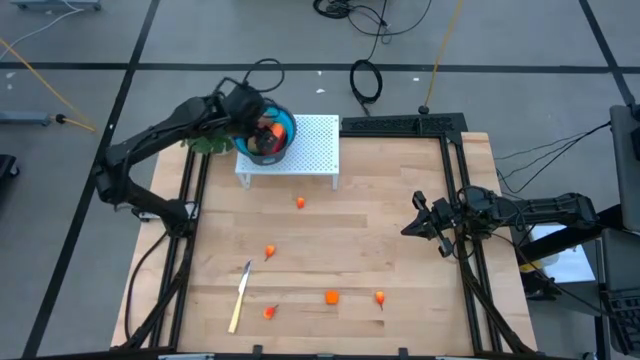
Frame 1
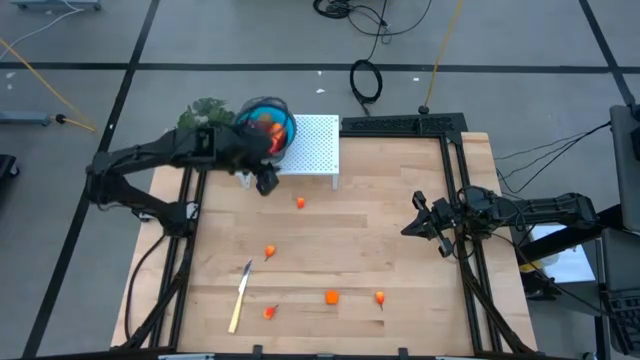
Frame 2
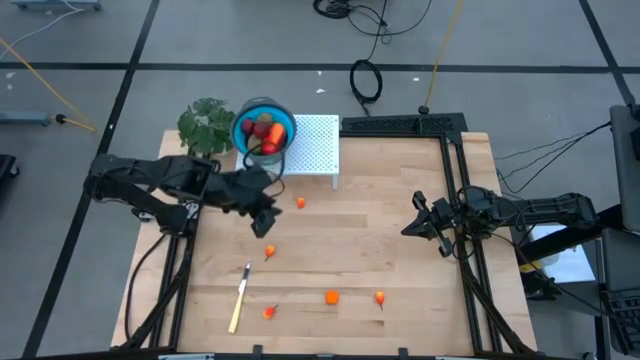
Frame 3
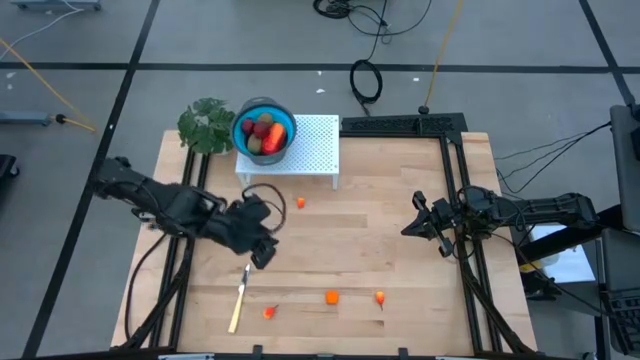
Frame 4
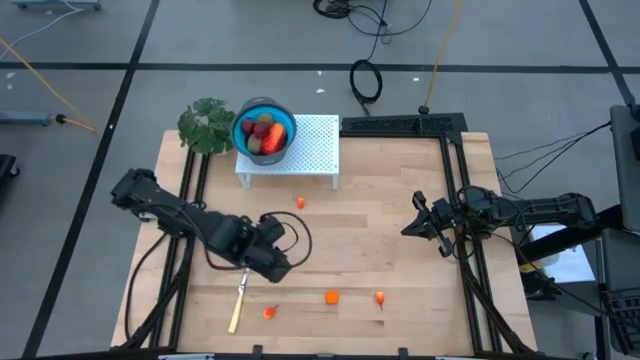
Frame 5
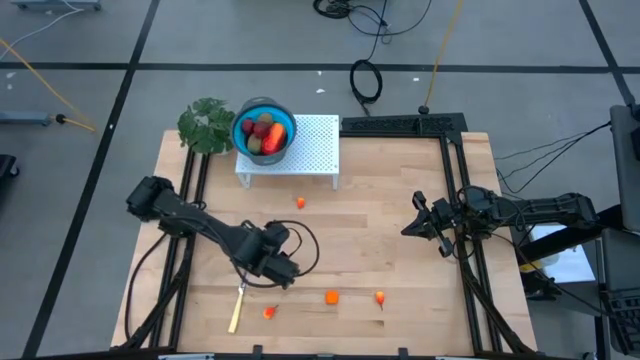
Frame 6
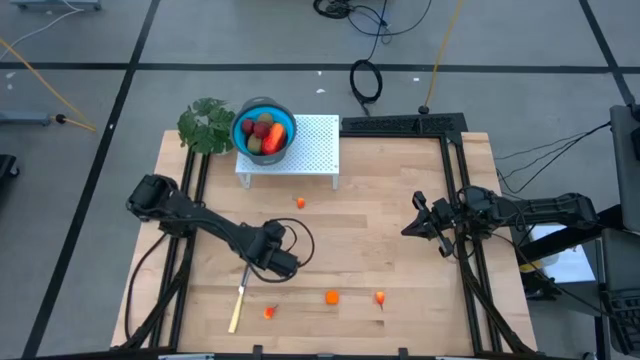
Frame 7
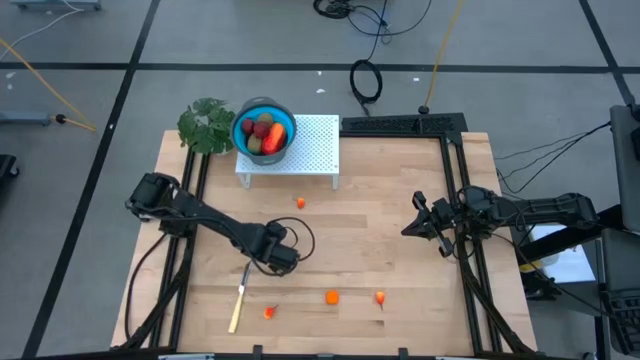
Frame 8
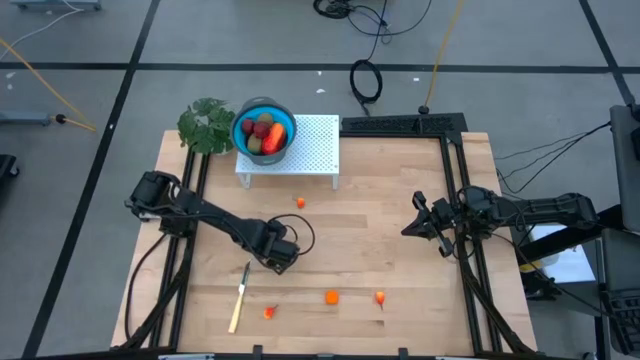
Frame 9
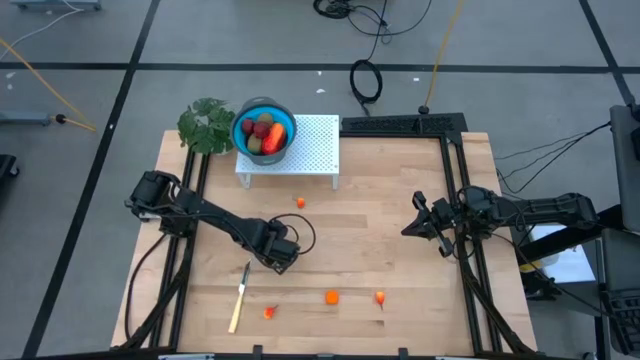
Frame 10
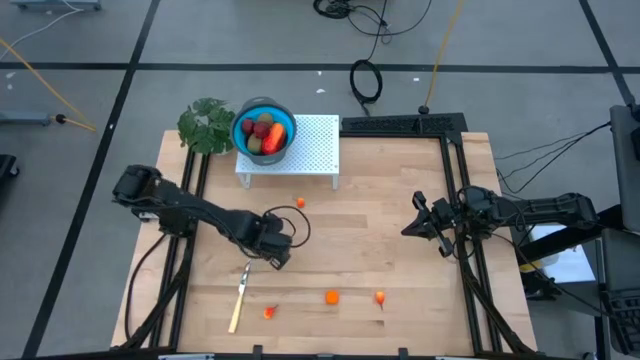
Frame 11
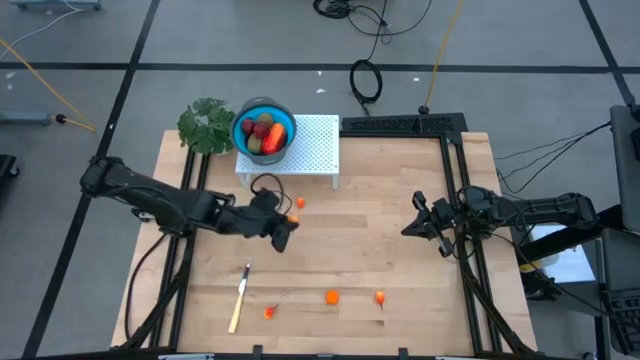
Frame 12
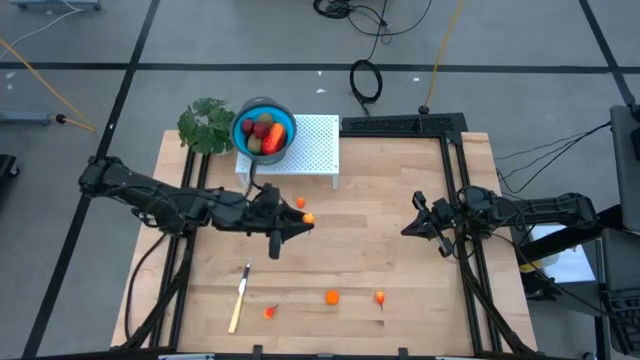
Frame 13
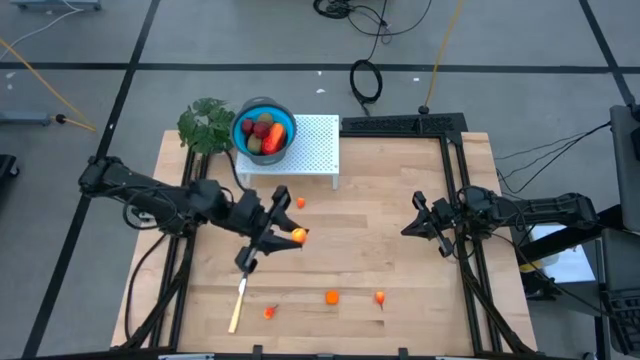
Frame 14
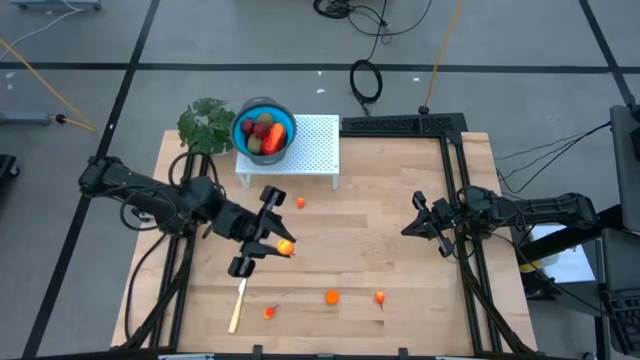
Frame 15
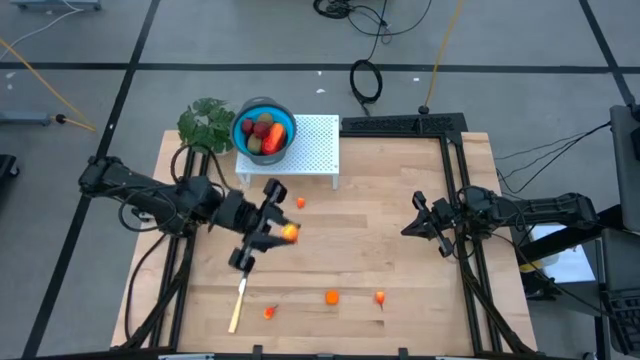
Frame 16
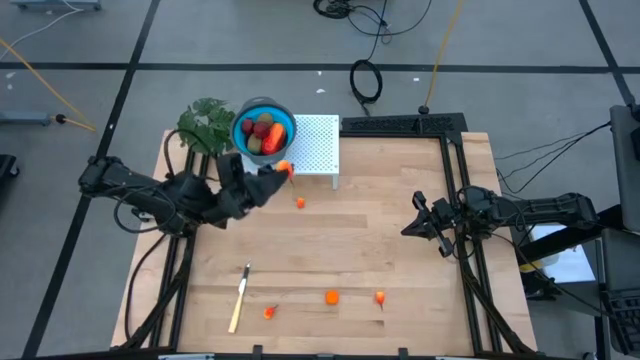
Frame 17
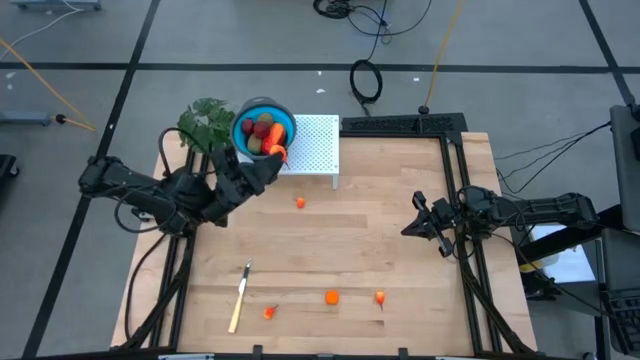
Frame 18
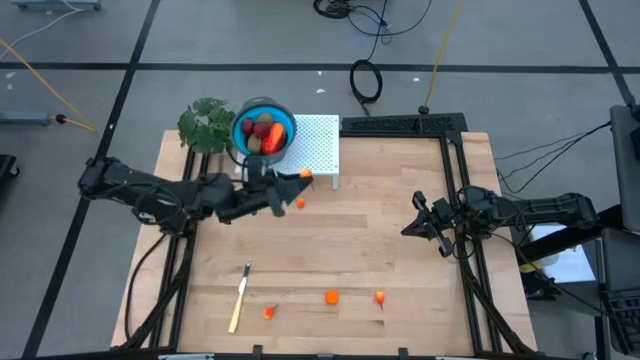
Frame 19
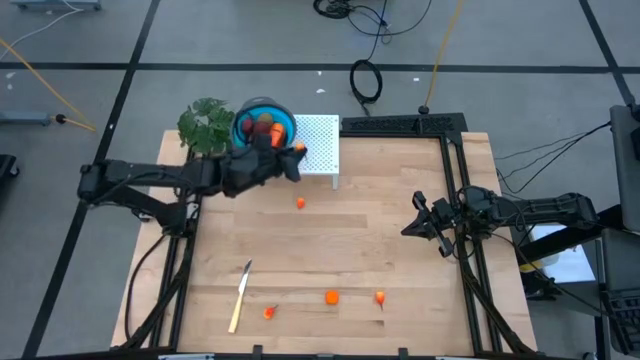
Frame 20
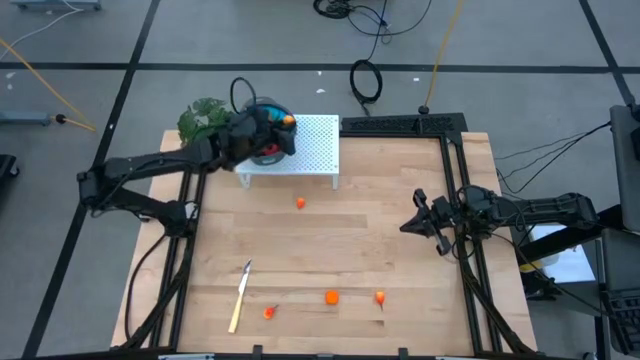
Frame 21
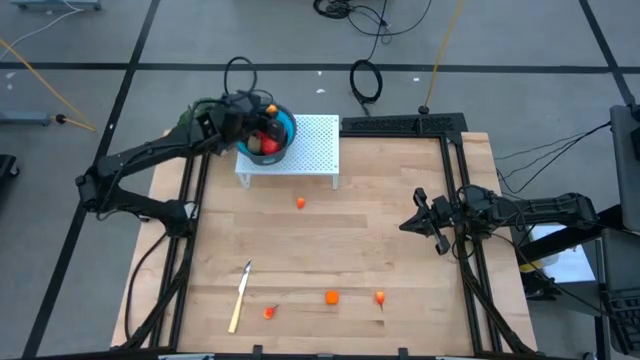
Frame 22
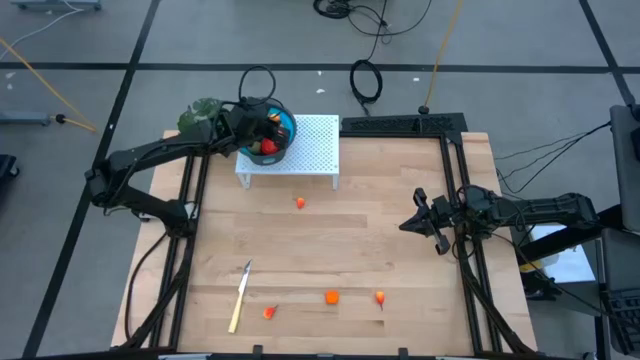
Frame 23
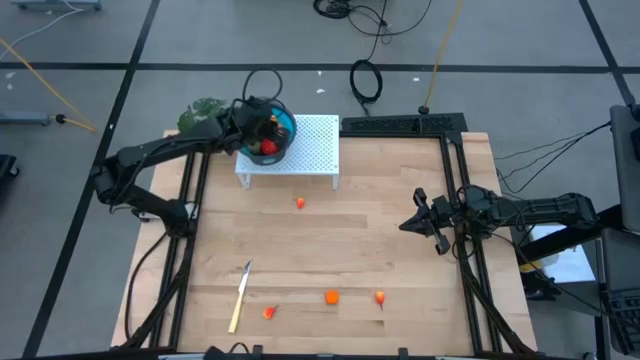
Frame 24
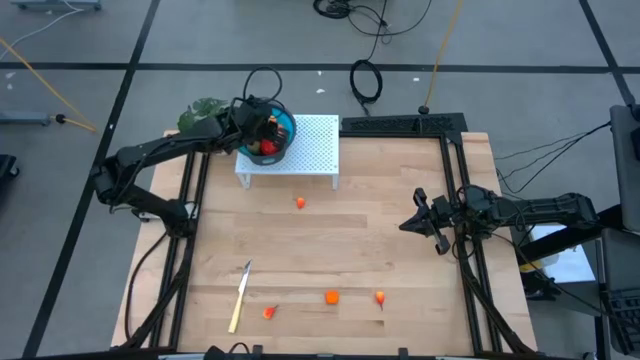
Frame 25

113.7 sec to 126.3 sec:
Task: Pick & Place Fruit
Put the middle left peach into the blue strainer bowl on the shelf

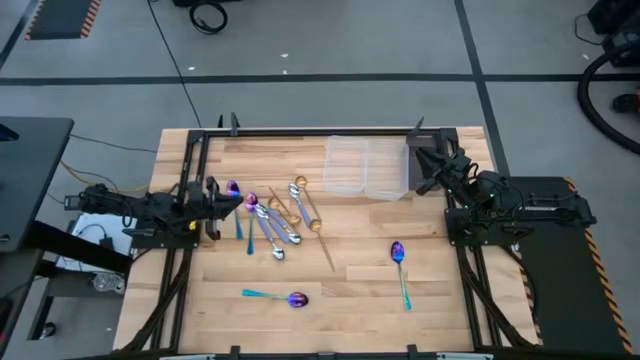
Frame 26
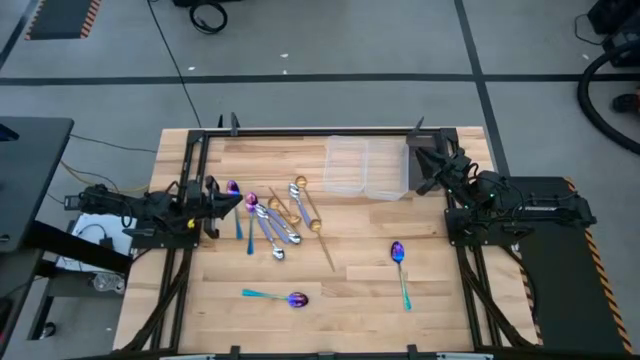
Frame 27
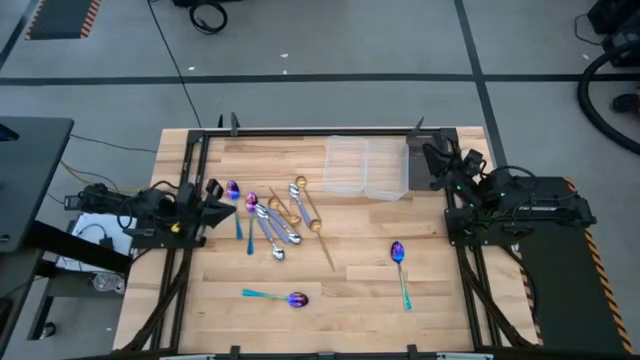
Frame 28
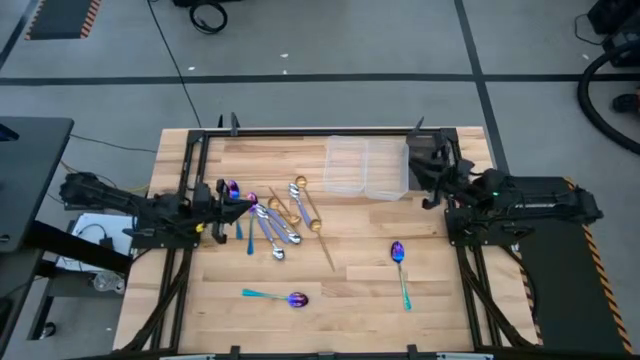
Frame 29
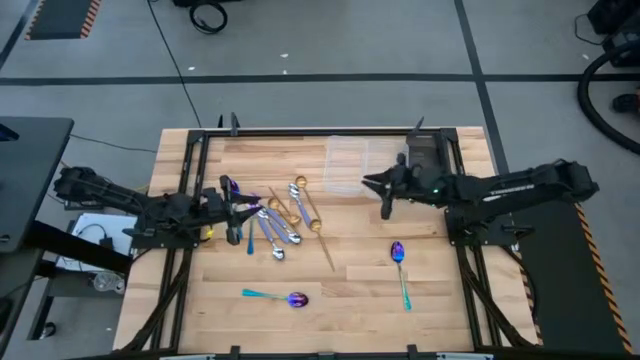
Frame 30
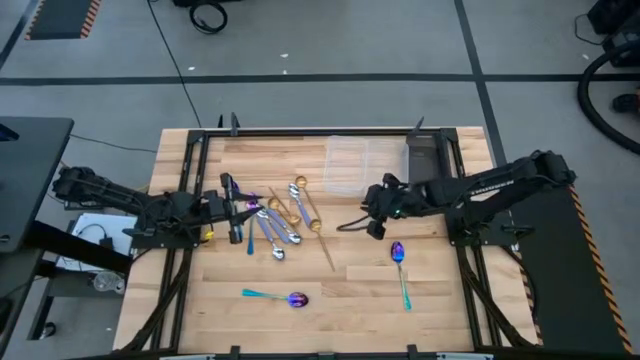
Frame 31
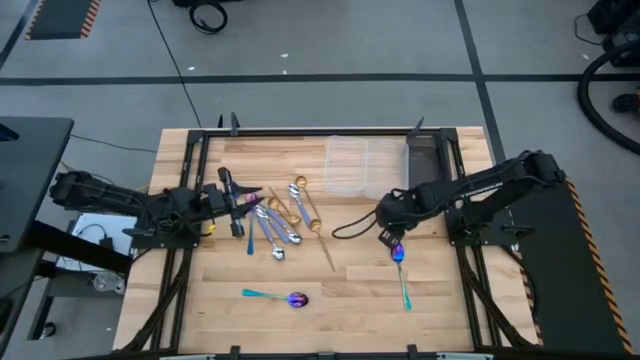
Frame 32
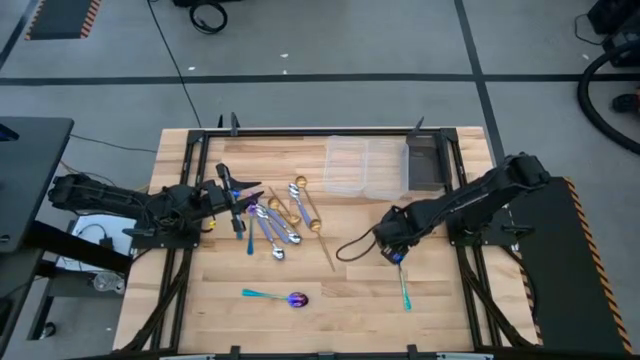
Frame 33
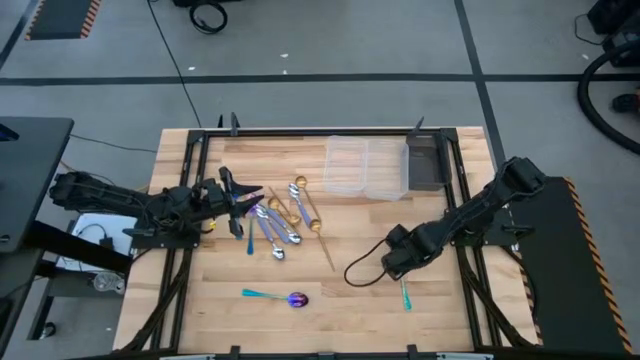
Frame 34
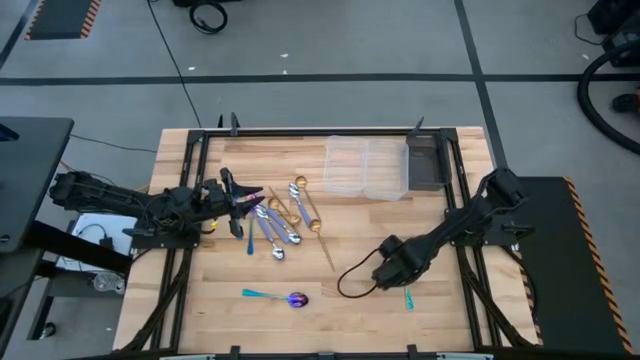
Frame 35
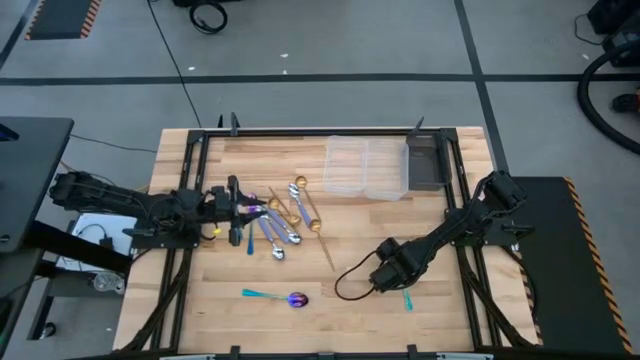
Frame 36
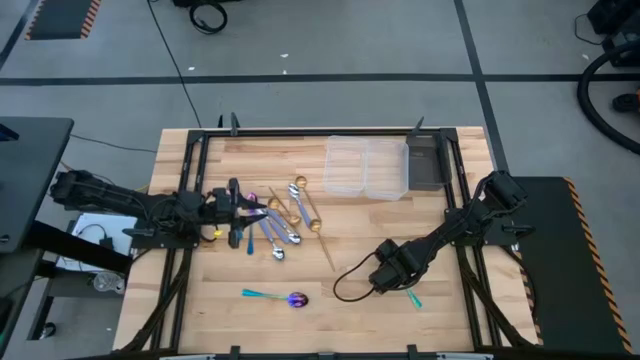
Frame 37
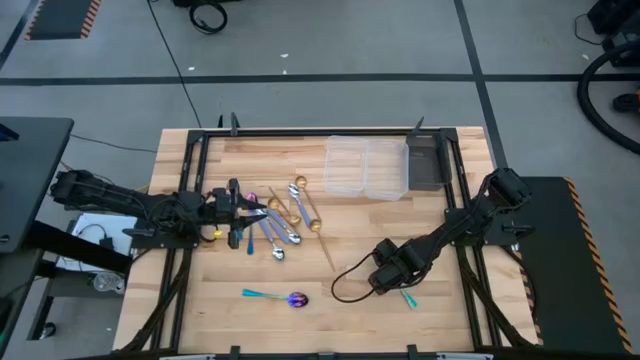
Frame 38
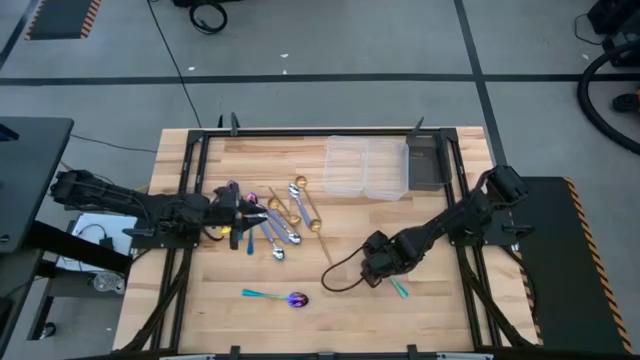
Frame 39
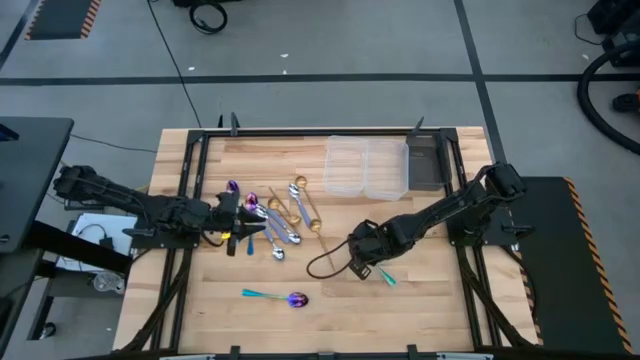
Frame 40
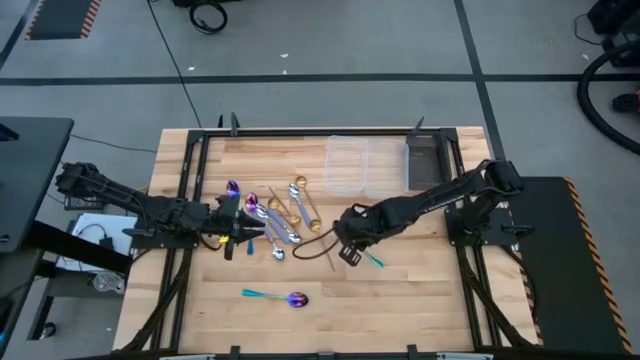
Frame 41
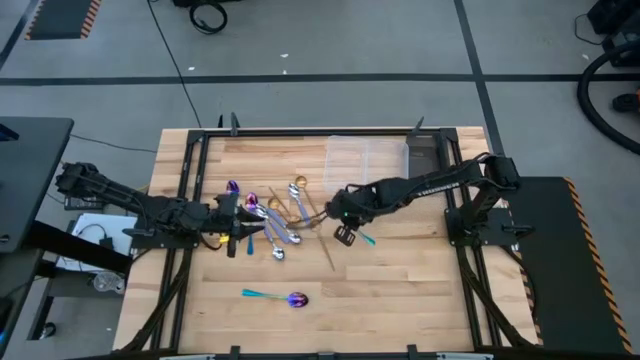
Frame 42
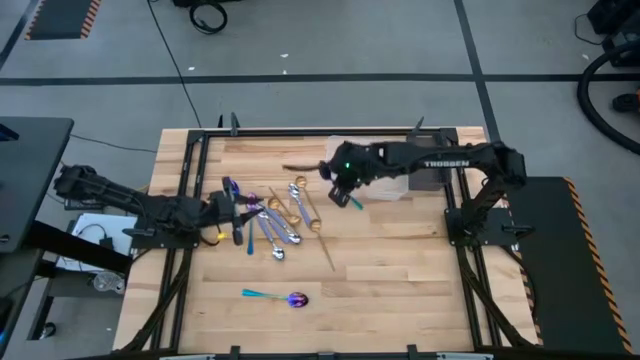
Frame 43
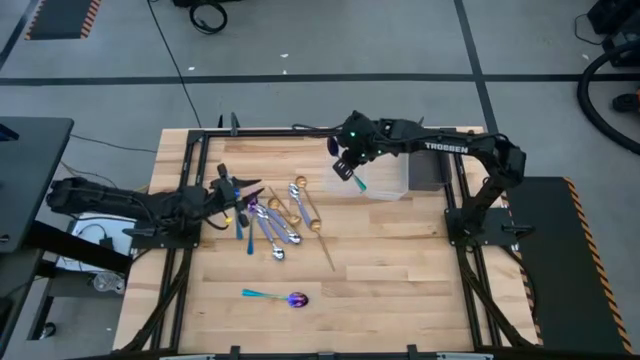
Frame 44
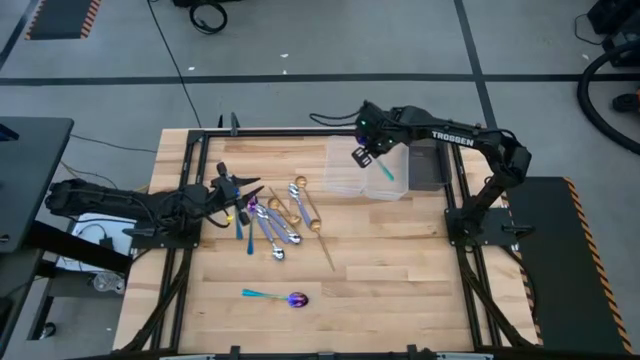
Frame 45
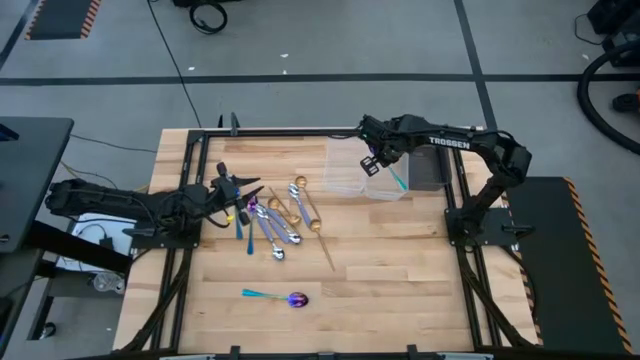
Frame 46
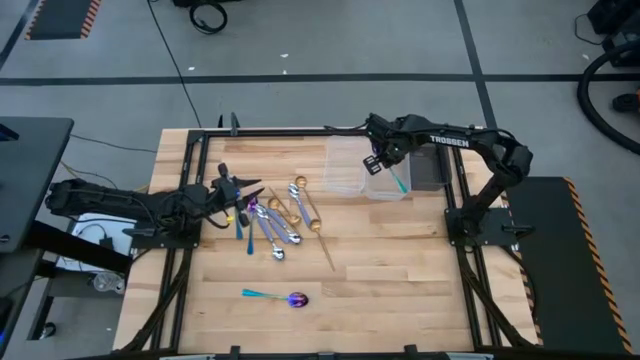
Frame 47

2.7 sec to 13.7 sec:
Task: Sort silverware by color (type)
Put the bottom right purple spoon into the right transparent bin
